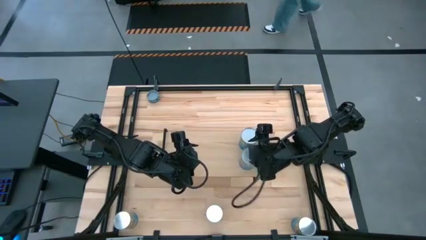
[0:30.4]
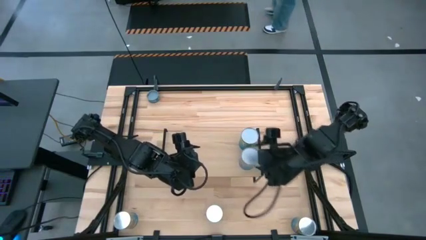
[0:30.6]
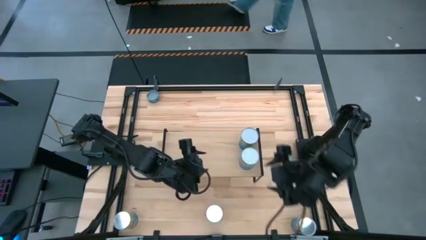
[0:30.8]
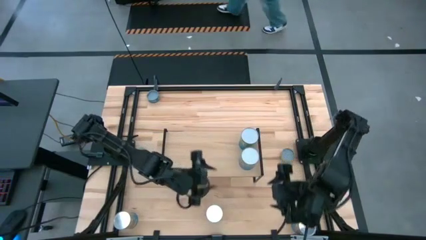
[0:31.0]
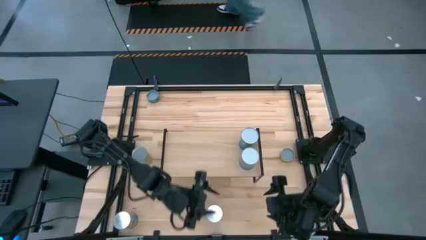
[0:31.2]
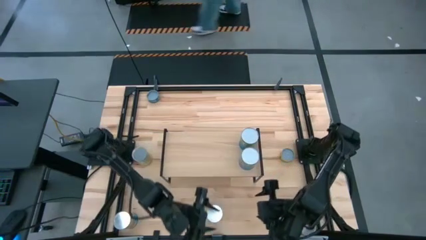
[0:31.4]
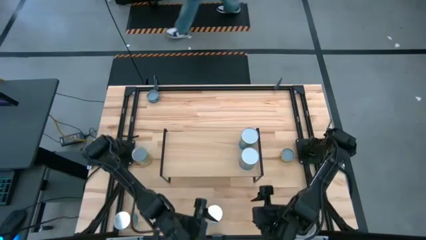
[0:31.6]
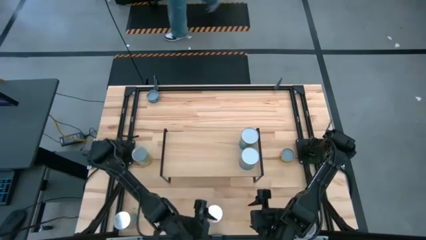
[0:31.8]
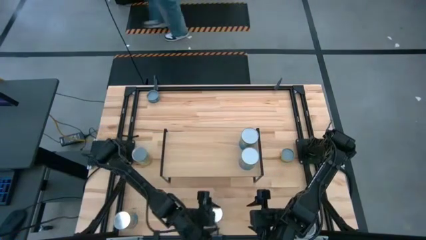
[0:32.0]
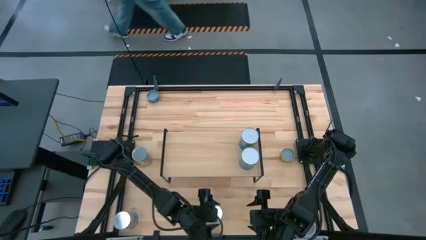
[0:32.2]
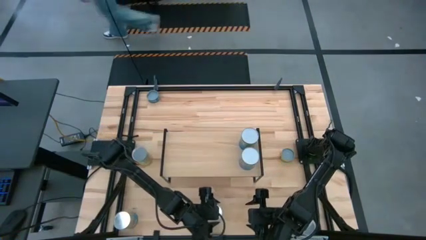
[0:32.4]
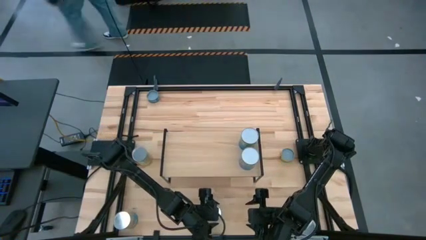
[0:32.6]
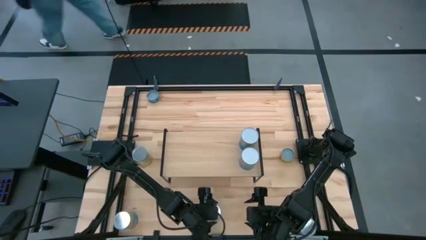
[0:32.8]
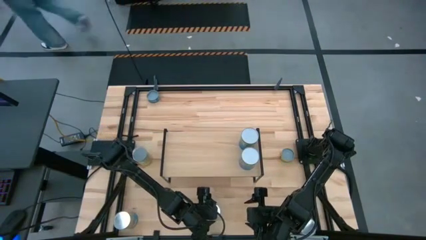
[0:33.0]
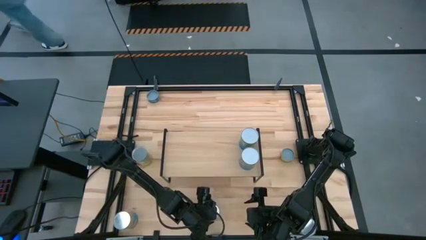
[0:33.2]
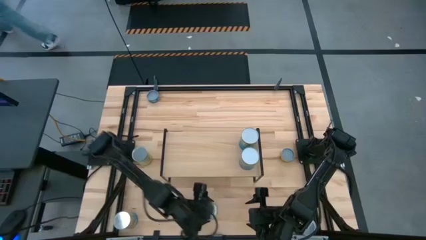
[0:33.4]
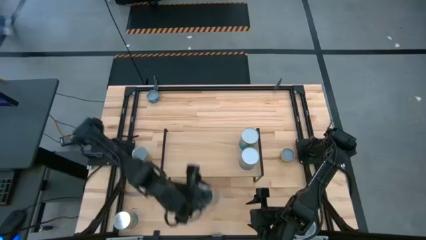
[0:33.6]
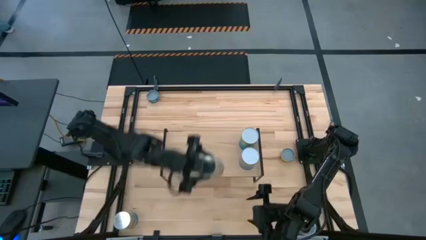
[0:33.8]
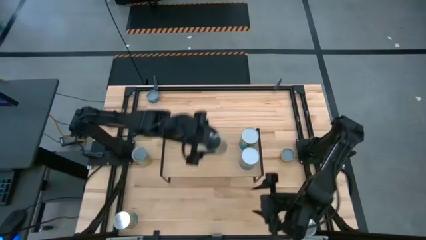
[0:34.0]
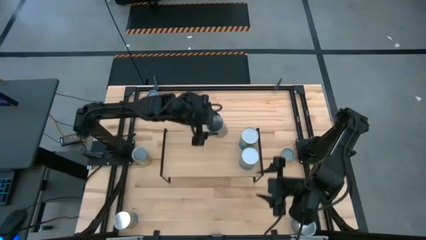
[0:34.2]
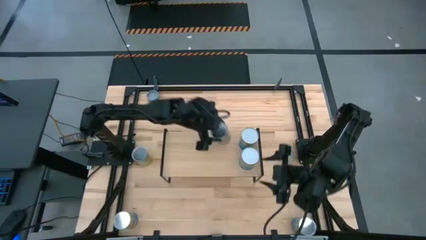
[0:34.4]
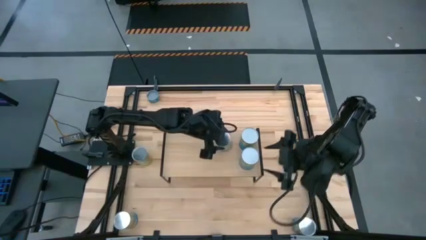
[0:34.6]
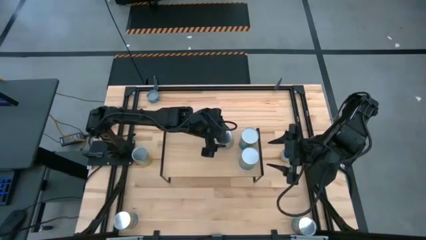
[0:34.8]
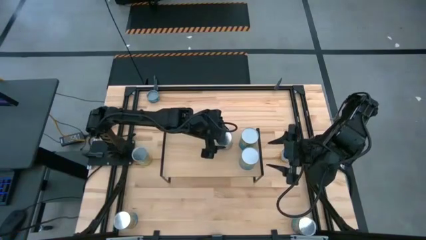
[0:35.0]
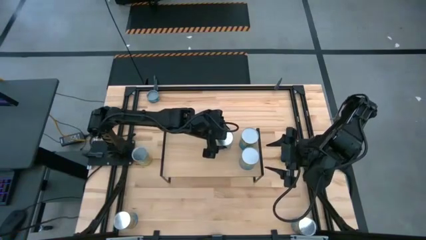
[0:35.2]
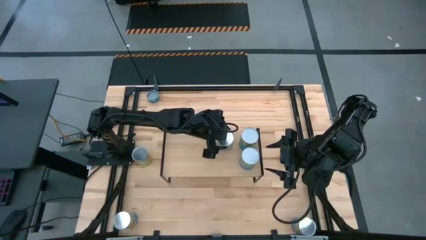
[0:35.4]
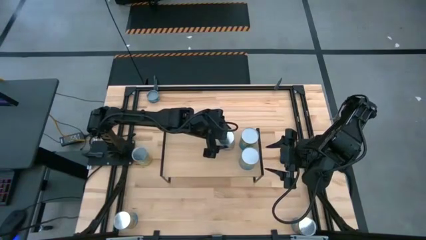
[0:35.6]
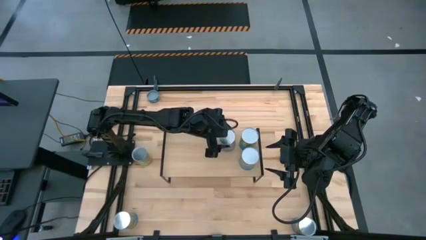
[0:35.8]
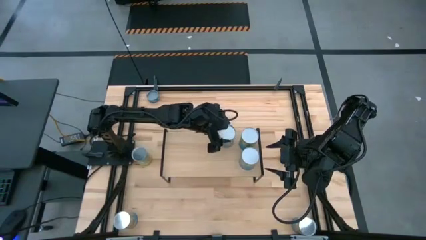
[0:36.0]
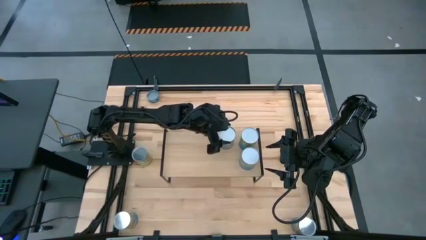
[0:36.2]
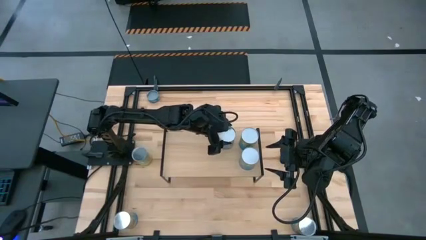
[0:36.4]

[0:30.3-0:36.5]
Task: Pick and place cans onto a shelf
Put the canned peaches on the shelf

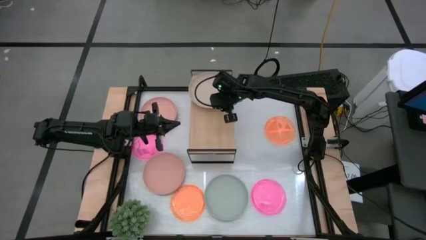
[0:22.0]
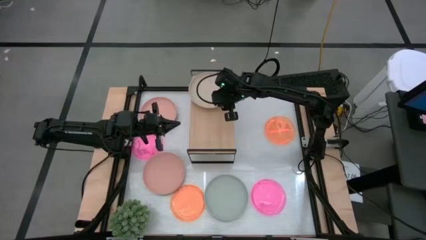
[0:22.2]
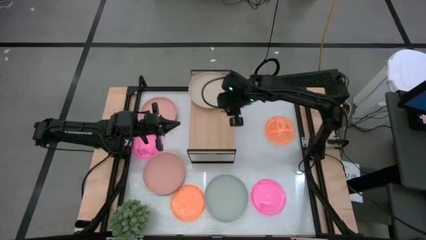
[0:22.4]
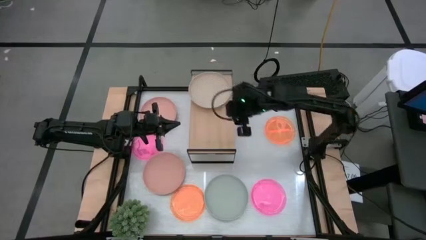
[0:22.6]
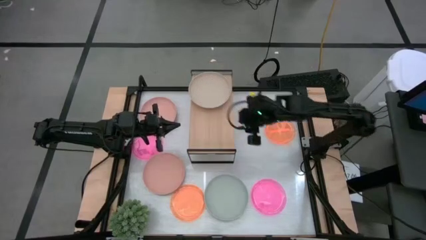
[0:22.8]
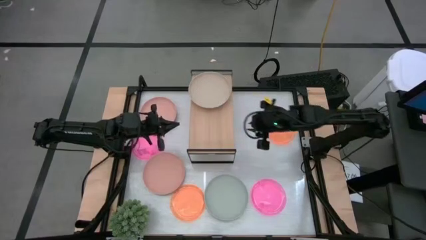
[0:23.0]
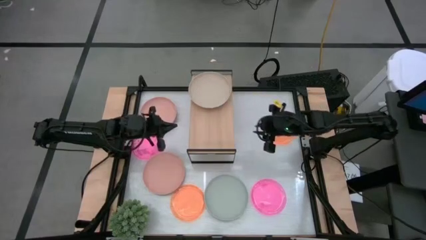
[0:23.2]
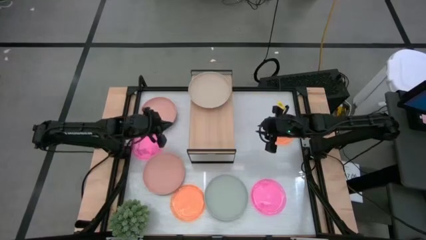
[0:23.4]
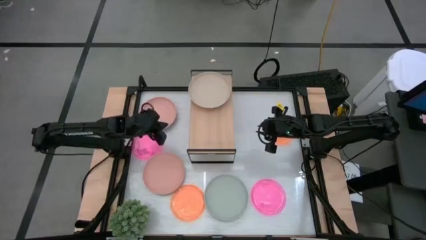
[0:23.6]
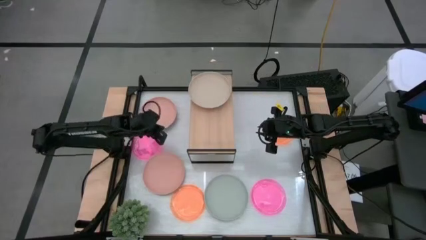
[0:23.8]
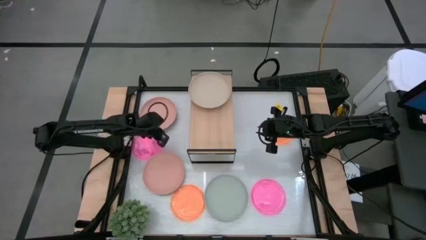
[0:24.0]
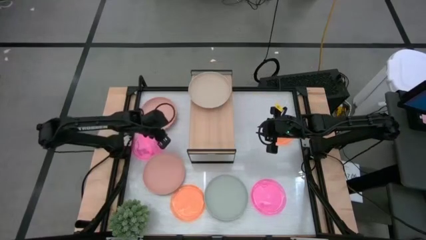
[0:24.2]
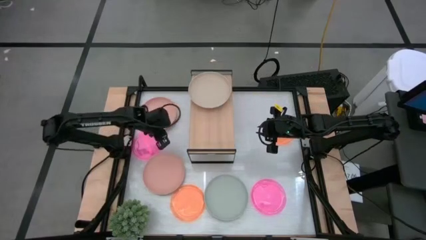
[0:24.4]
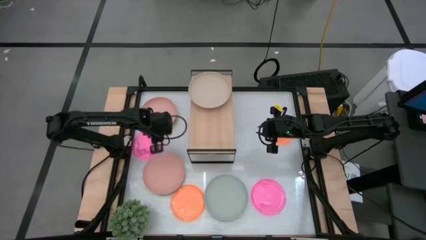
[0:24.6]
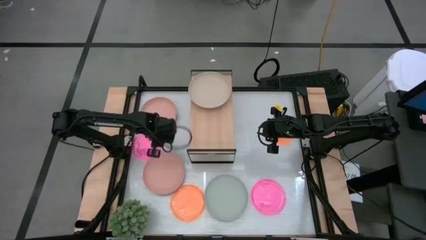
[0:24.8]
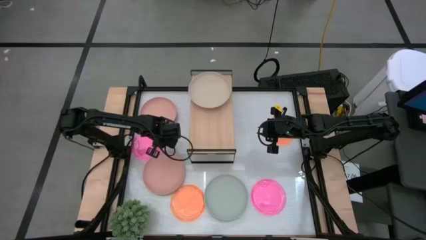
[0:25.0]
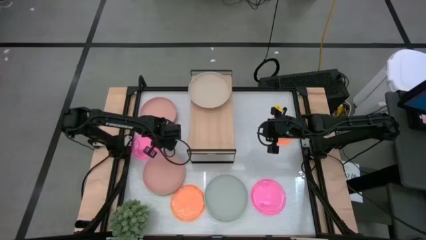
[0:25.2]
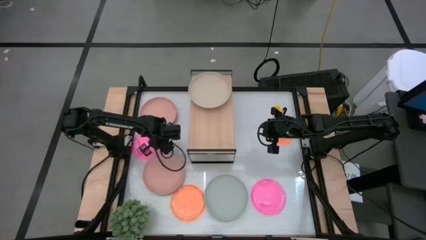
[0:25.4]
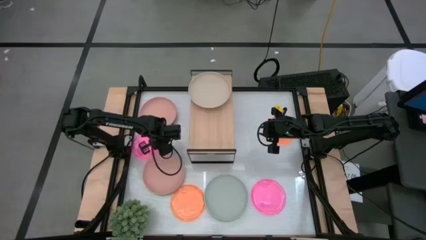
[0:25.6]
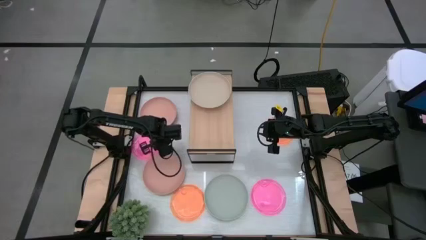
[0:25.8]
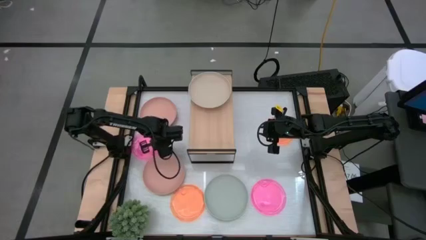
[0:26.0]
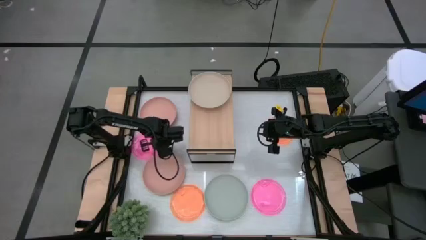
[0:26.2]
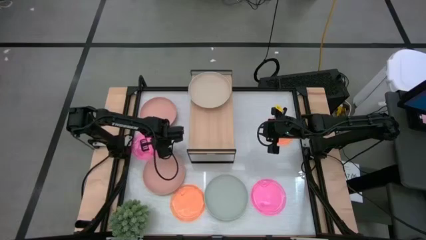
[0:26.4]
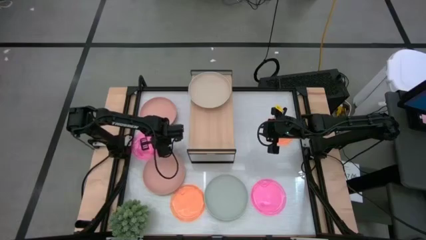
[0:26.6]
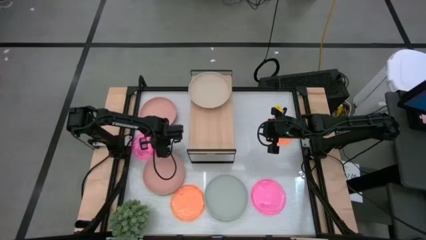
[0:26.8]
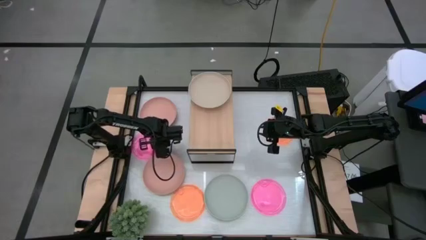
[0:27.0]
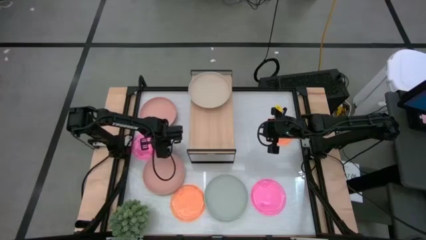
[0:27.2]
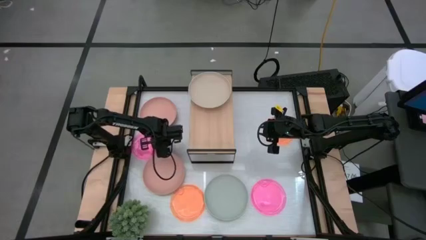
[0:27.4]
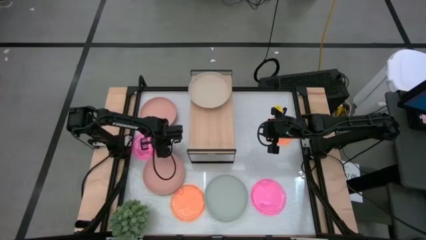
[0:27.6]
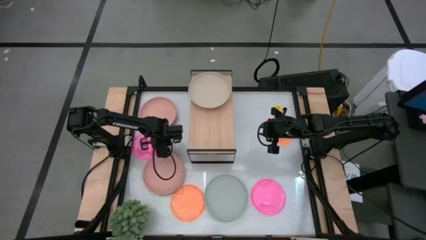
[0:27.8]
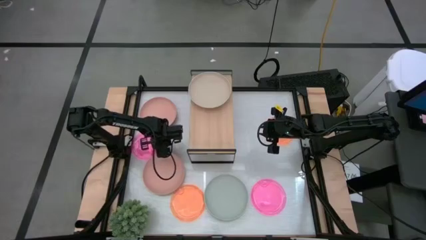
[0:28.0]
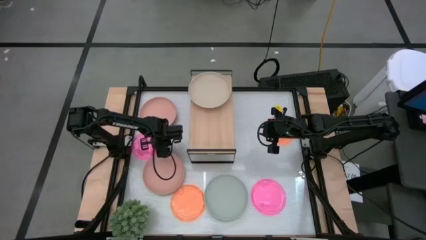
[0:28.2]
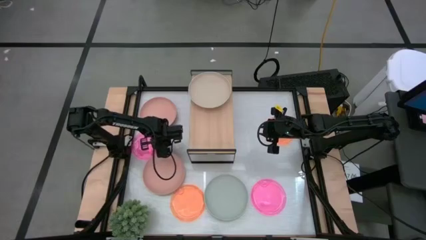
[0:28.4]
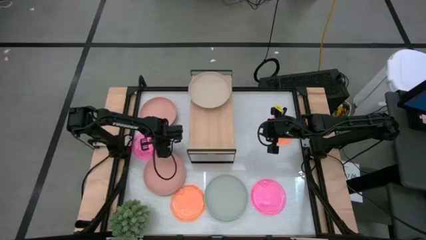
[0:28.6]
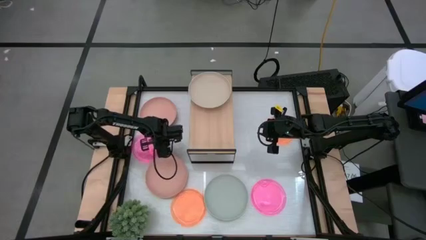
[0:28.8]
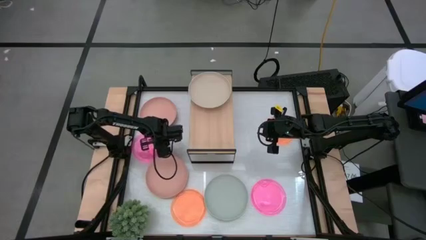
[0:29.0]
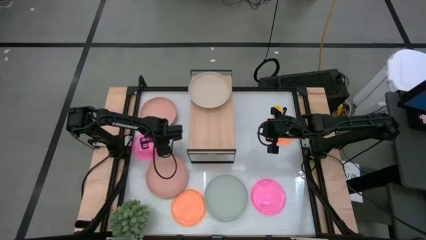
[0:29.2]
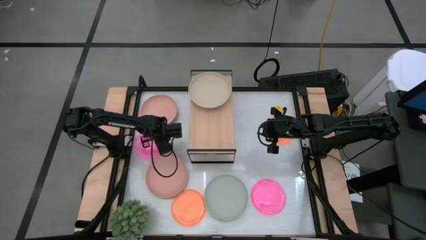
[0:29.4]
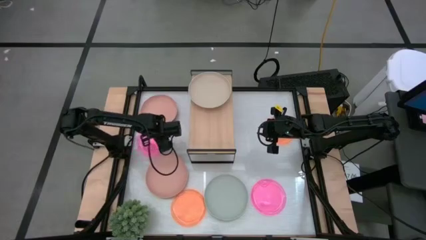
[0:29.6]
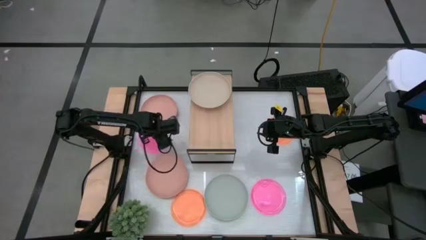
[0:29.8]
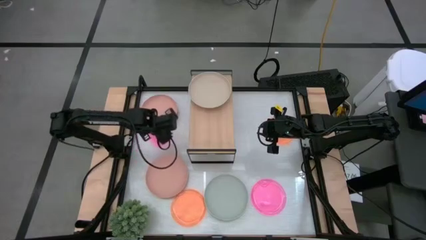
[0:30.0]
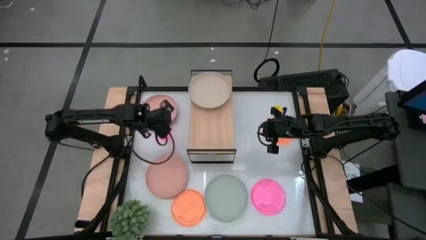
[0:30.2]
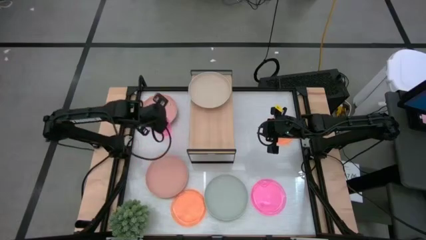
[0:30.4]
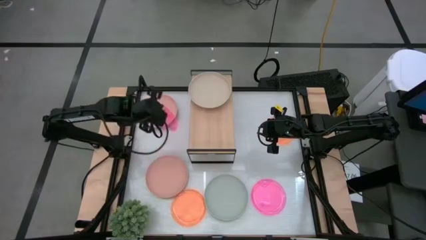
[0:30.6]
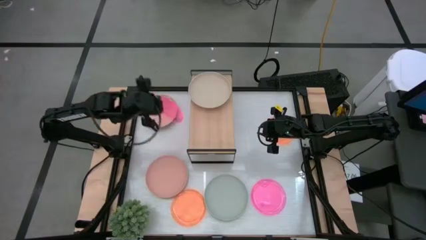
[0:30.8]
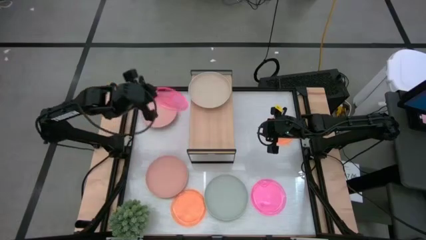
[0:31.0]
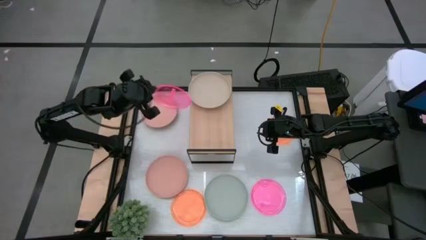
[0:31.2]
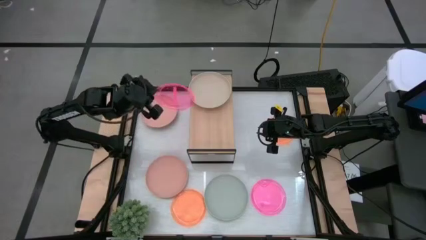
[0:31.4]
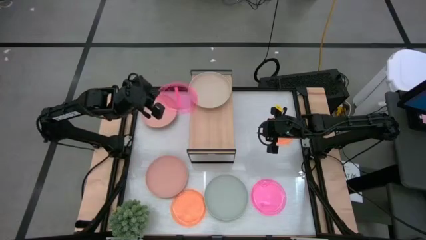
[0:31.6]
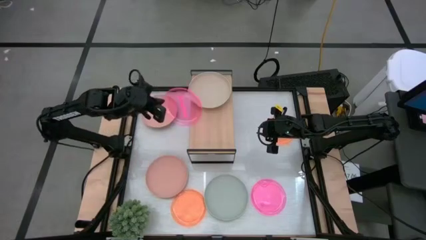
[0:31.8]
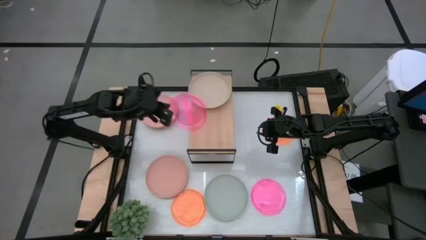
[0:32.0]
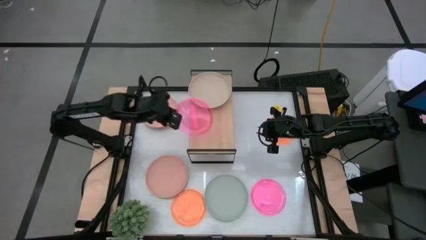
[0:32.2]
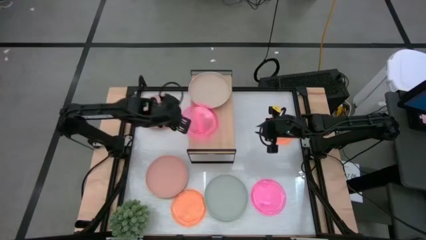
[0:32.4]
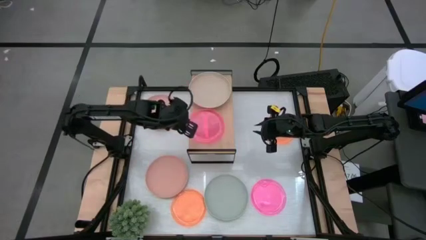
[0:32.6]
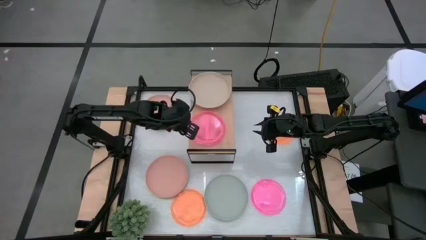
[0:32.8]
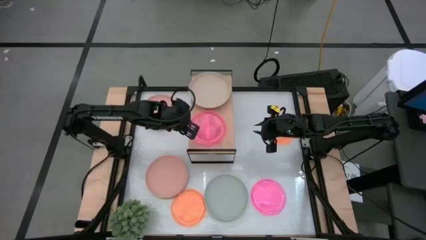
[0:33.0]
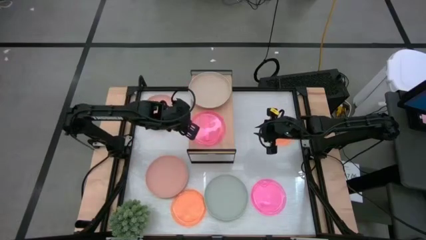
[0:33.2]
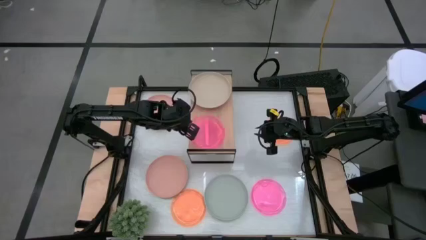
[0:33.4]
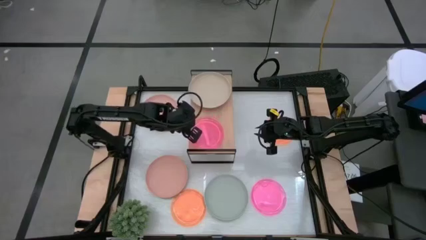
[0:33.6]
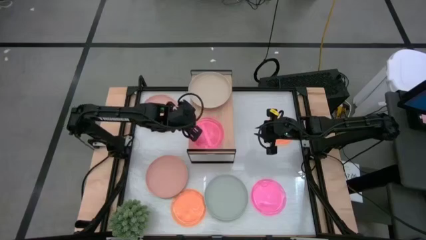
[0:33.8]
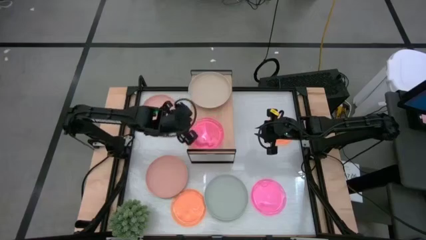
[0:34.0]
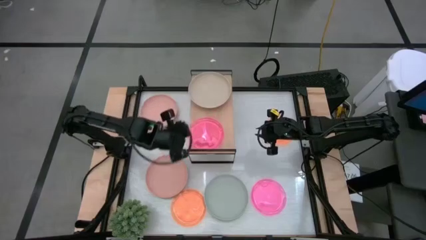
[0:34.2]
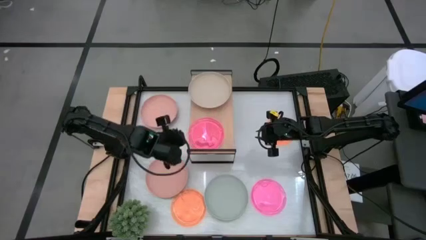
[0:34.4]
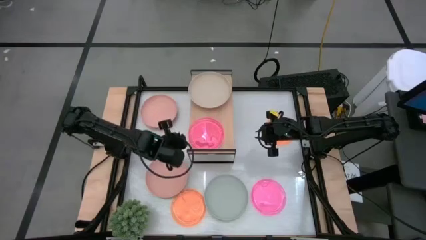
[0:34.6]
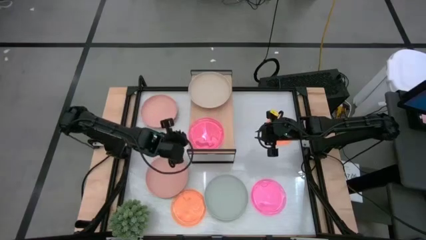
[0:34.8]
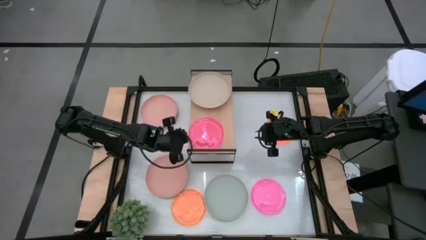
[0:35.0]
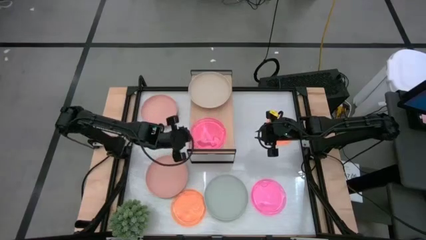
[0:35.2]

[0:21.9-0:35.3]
Task: Place and stack plates onto a shelf
Put the left pink plate on the shelf
